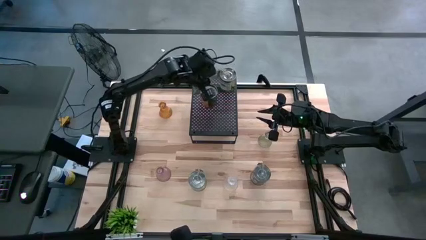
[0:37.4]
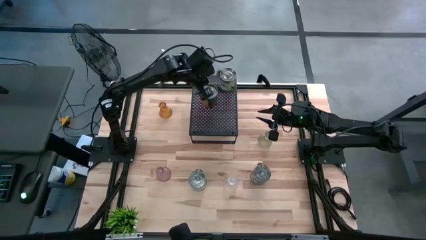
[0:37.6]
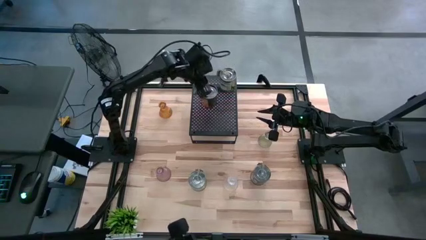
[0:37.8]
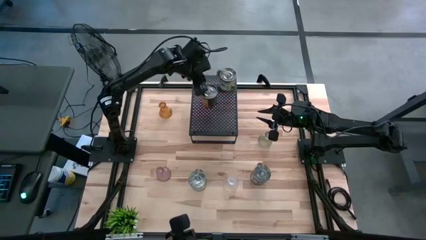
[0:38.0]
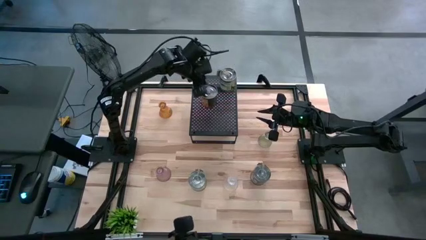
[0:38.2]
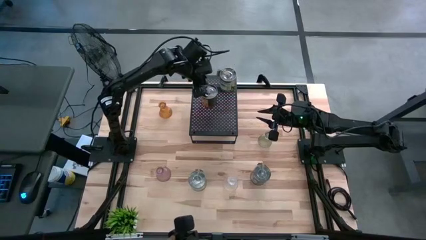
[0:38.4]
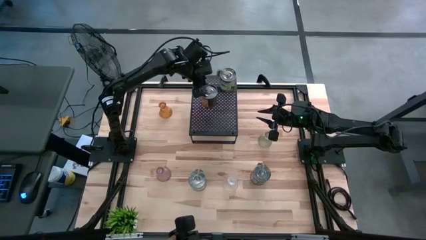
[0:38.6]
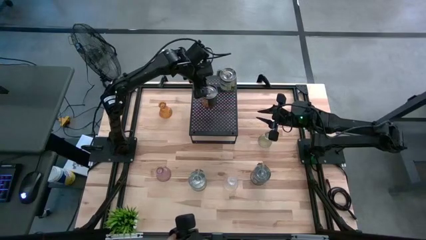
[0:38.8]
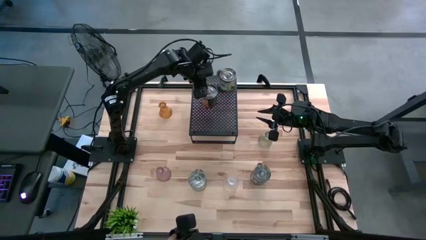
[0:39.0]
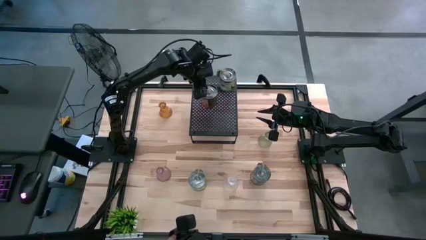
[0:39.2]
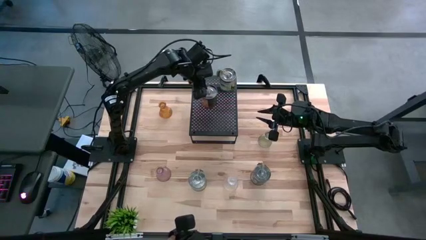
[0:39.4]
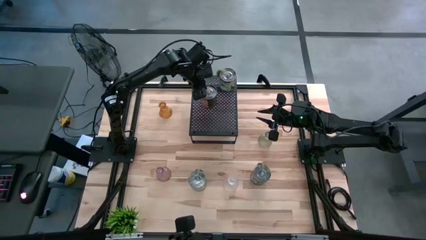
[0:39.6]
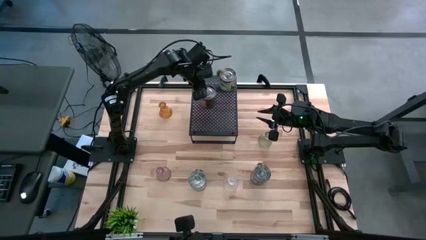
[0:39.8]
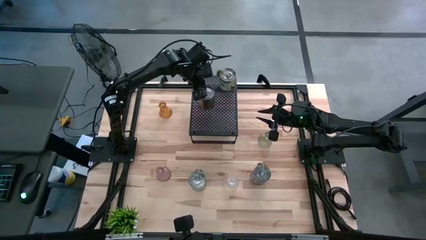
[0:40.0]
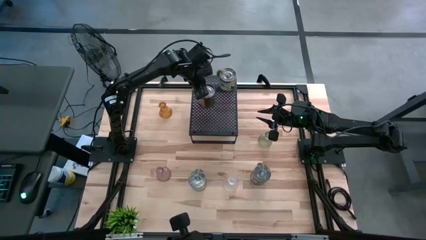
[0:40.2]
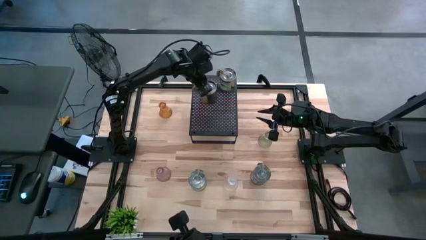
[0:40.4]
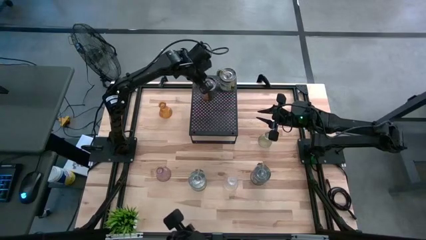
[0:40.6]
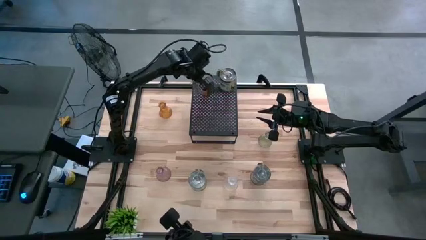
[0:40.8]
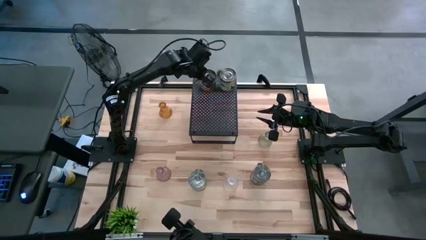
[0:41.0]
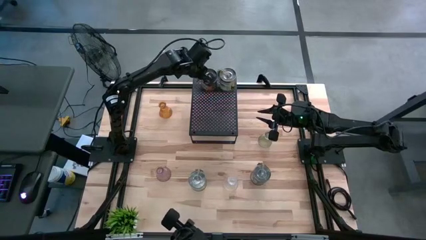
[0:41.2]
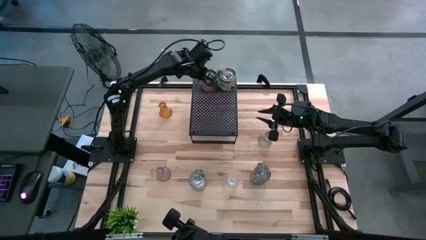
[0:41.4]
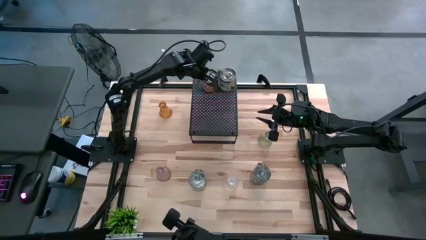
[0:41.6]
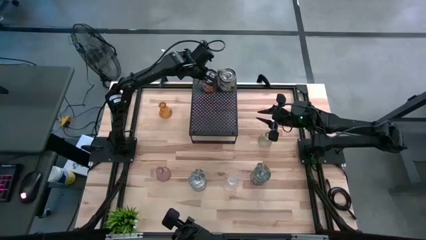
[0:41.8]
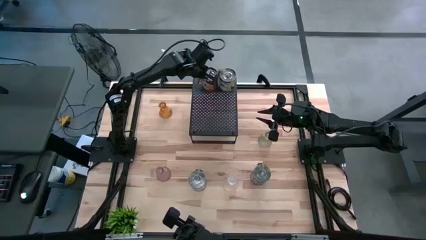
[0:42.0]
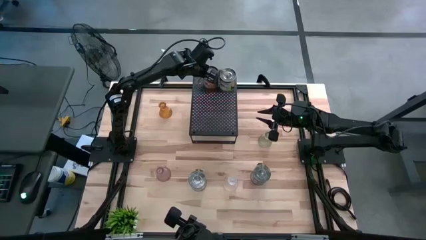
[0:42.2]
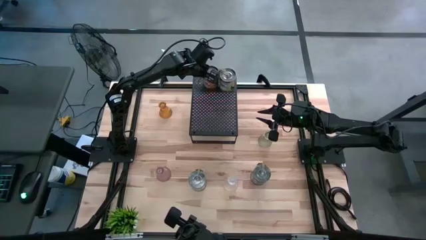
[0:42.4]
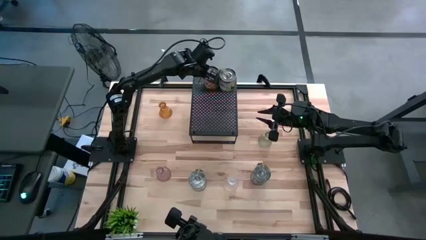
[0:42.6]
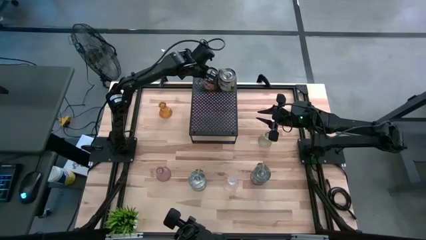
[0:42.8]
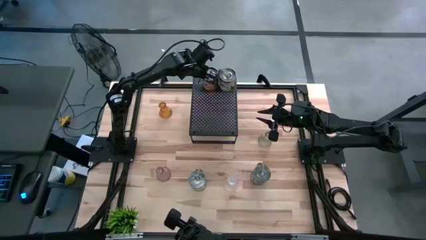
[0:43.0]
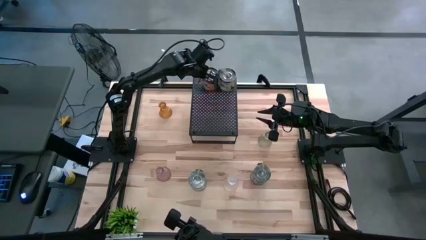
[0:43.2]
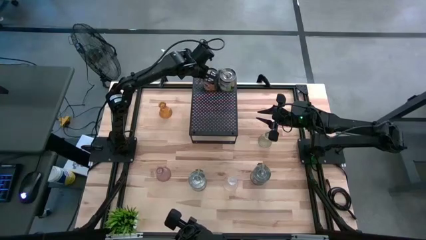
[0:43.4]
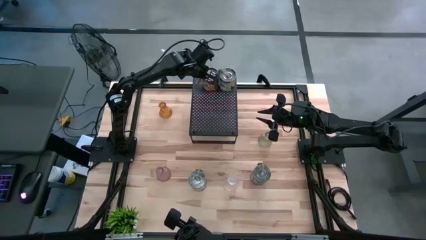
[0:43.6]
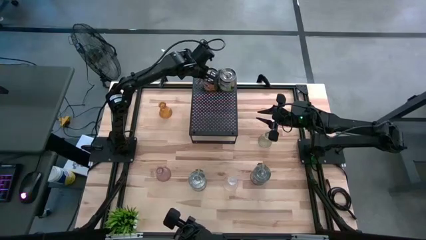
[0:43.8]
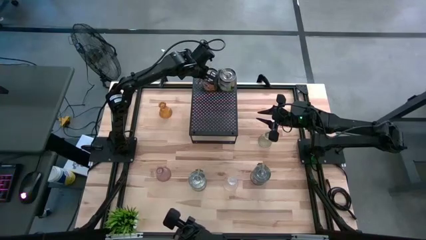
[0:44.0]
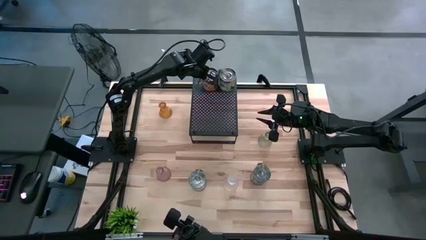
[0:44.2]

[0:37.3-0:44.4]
Task: Pick & Place candle stick holders
Align the silver scented candle with the silver scented candle on the black shelf

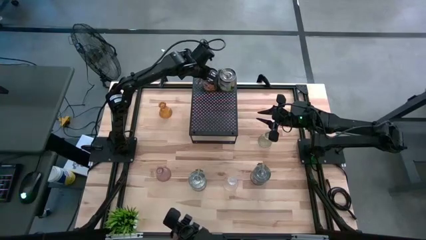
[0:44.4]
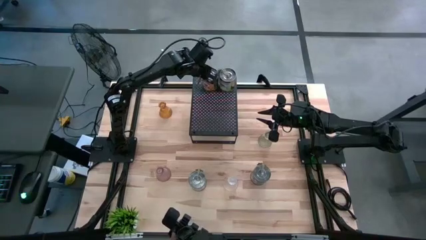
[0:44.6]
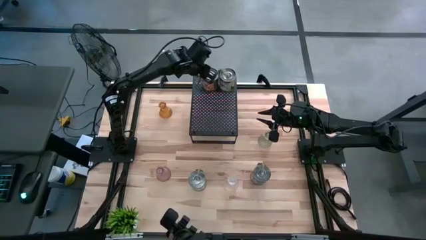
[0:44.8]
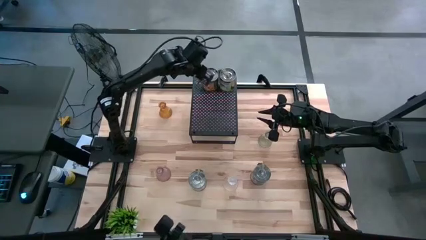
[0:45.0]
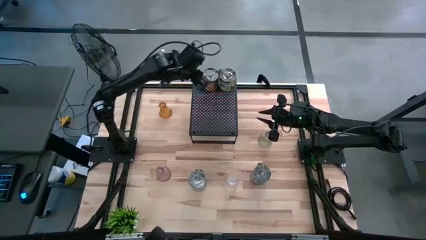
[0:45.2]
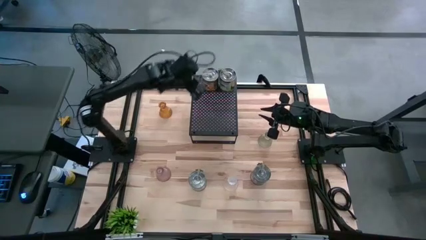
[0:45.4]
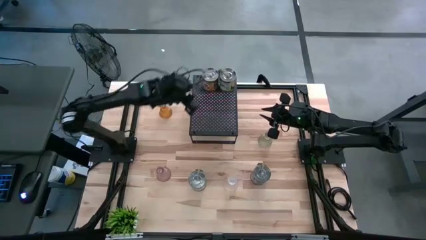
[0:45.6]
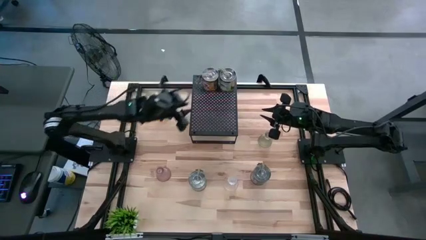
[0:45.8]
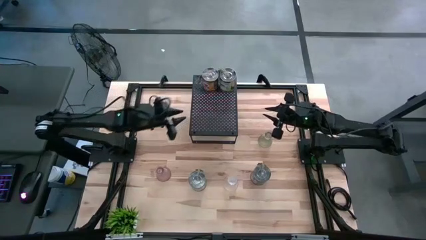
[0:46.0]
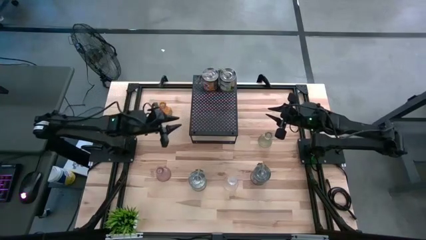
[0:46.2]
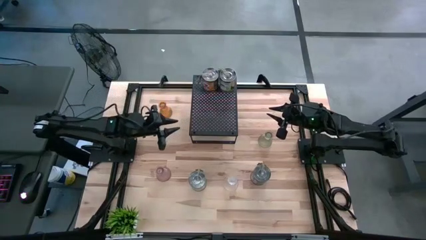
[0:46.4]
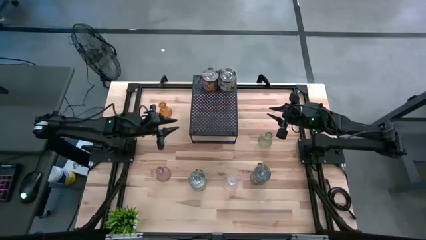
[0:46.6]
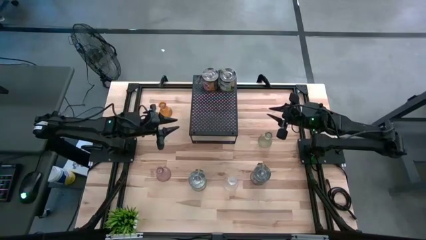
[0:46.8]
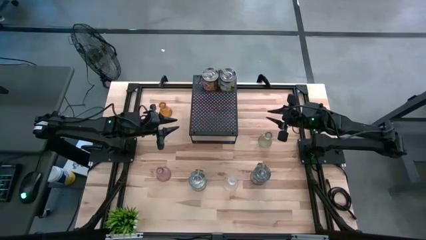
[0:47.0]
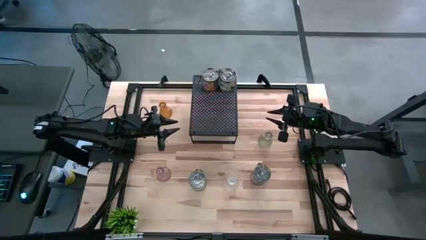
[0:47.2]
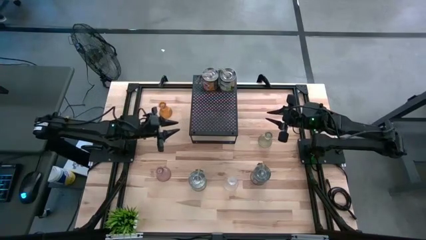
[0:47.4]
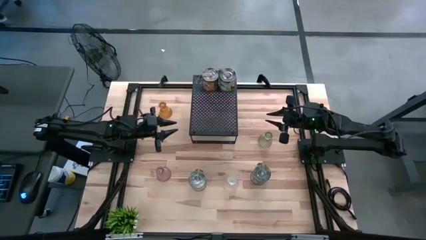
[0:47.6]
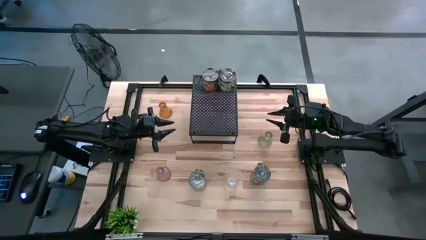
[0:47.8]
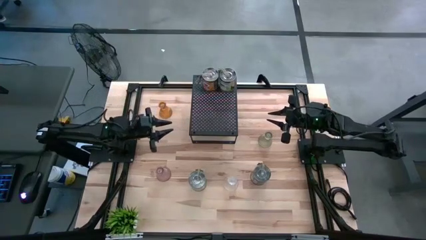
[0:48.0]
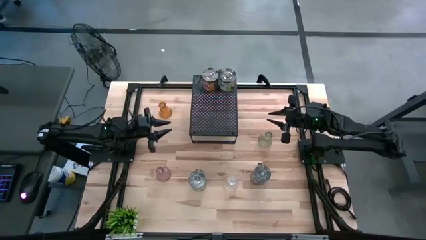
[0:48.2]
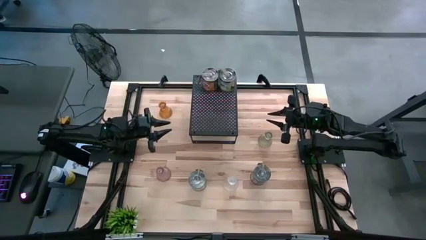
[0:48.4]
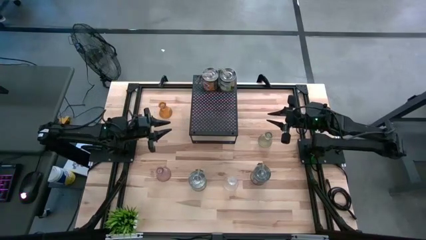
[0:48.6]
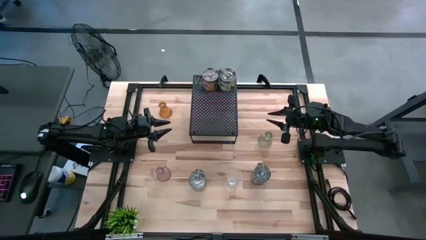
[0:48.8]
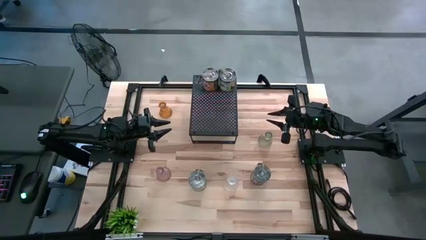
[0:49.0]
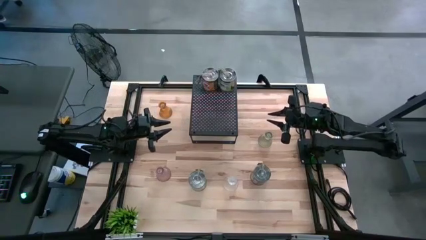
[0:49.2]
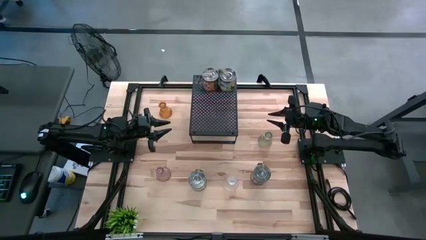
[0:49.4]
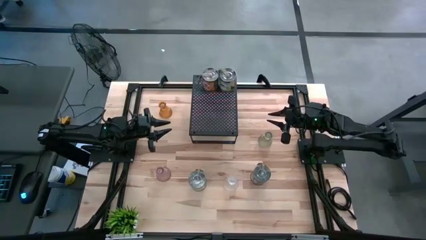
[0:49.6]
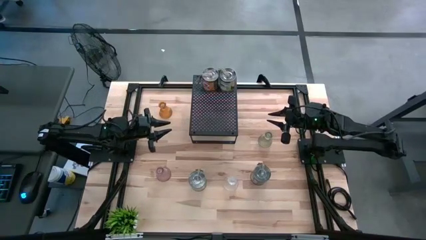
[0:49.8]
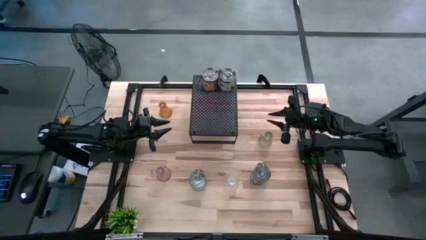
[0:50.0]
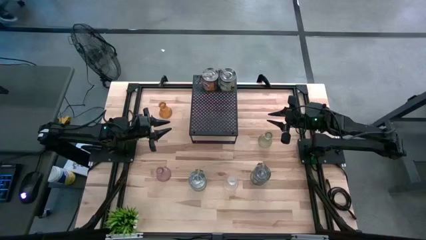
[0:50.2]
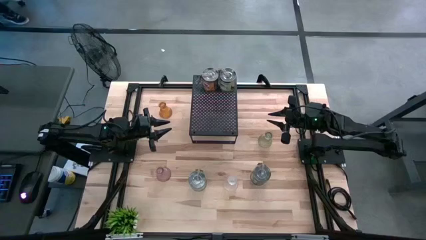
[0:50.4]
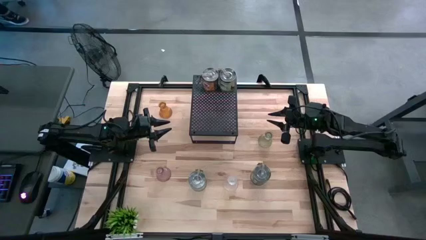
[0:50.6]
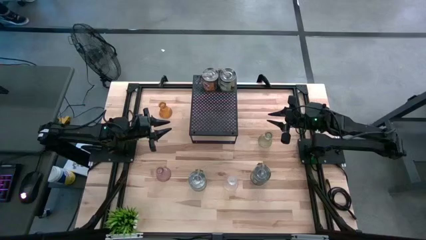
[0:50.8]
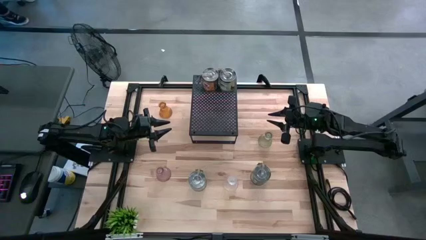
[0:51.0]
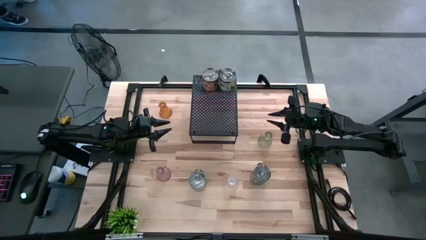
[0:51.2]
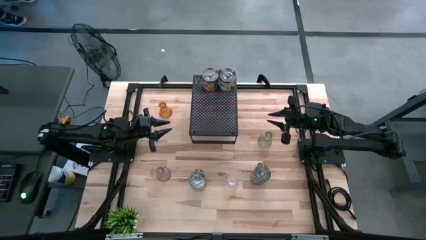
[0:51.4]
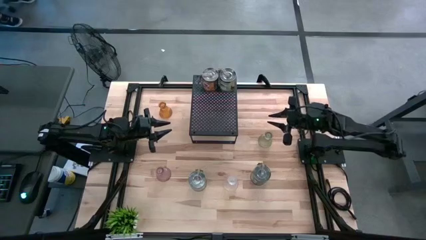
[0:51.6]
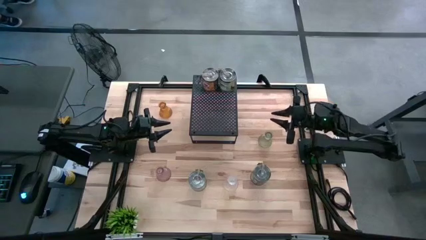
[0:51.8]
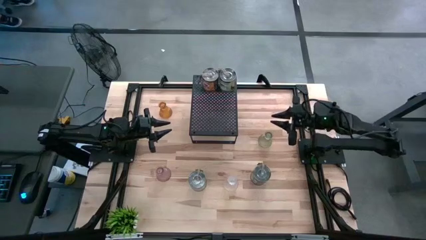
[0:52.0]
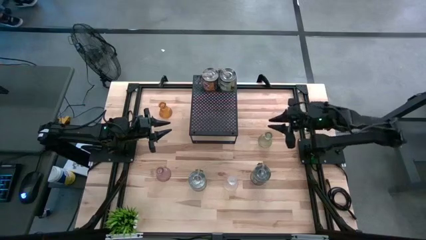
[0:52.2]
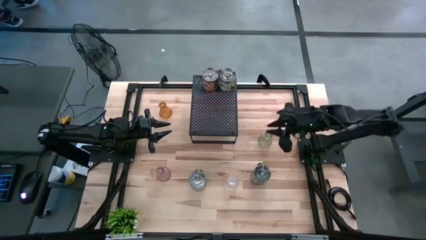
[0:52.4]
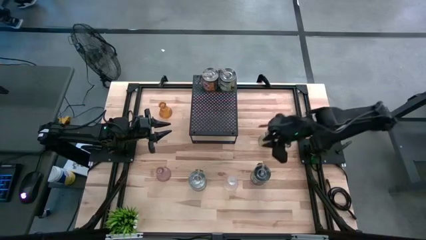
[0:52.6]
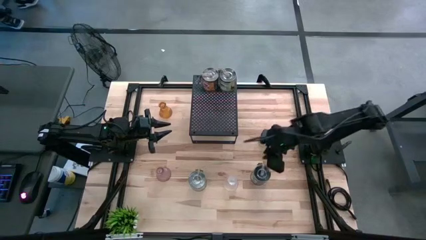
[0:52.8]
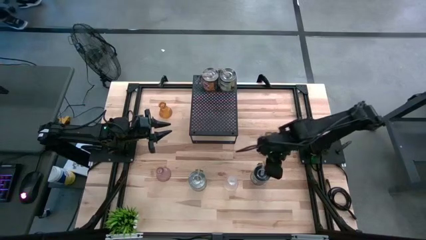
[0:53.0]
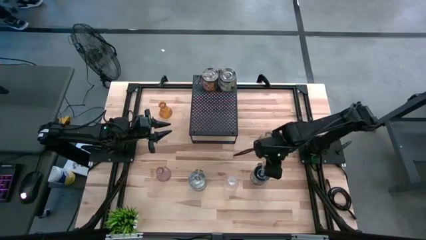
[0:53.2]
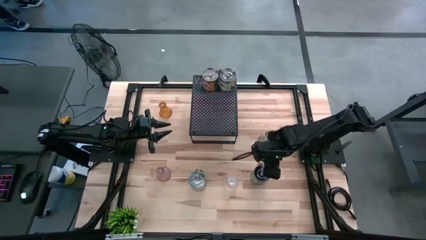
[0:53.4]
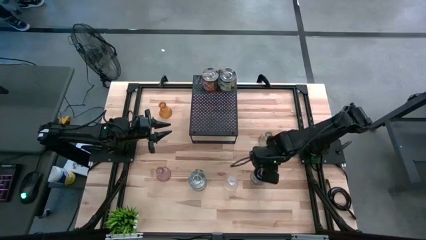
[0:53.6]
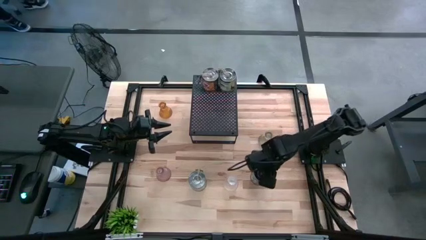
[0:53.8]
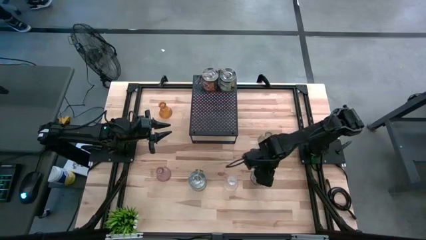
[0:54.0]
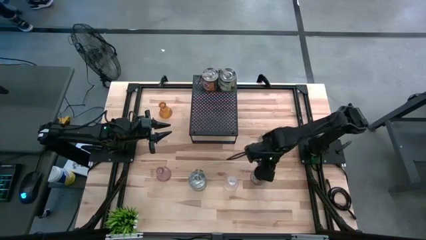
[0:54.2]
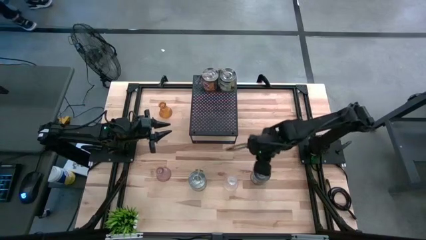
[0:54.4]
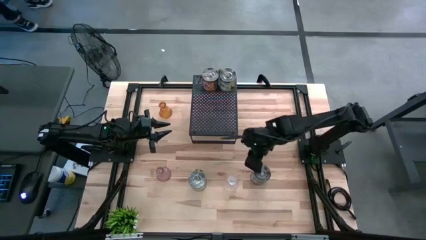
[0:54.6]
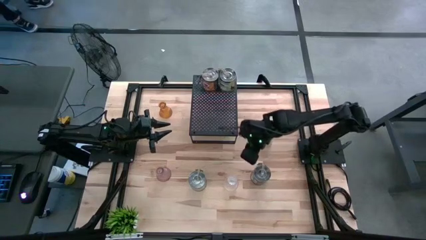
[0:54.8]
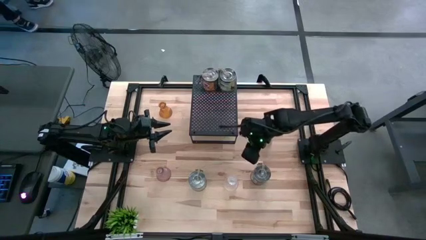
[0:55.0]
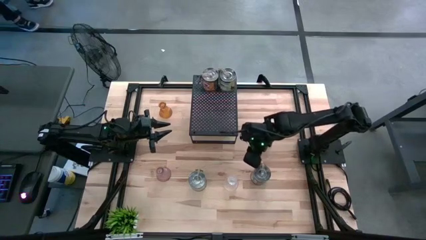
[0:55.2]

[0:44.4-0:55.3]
Align the silver scented candle with the silver scented candle on the black shelf
